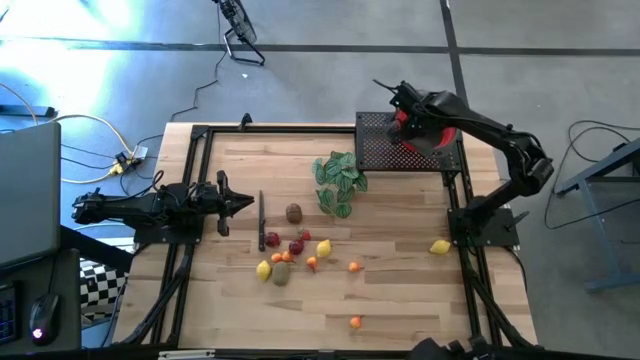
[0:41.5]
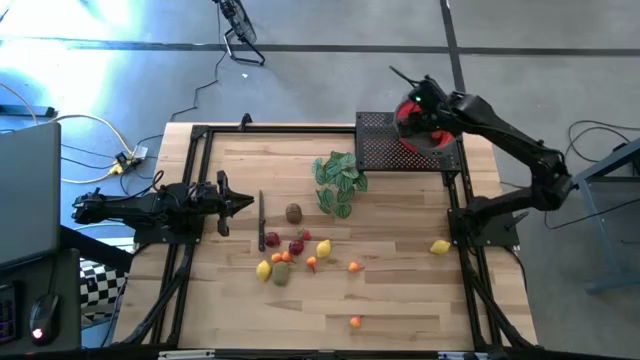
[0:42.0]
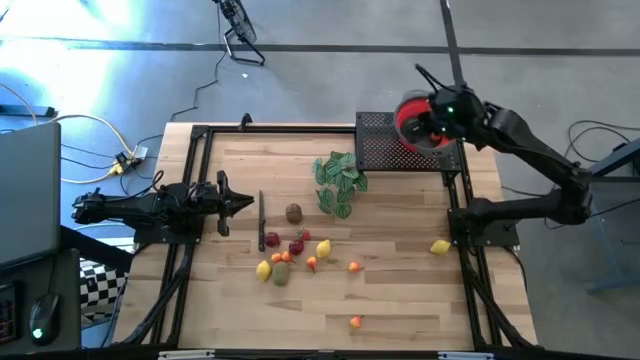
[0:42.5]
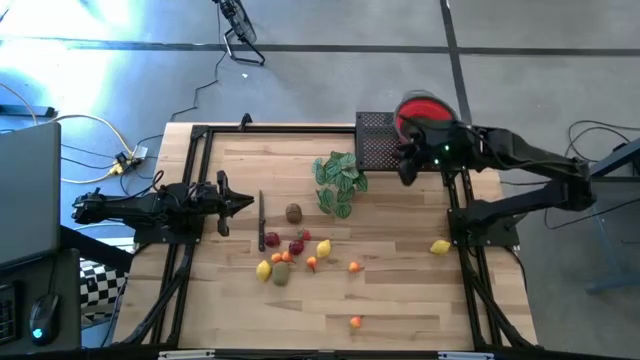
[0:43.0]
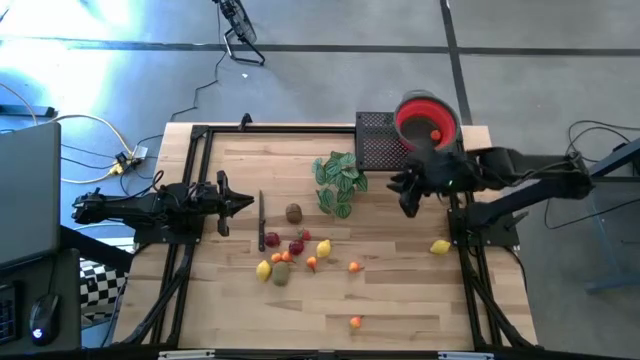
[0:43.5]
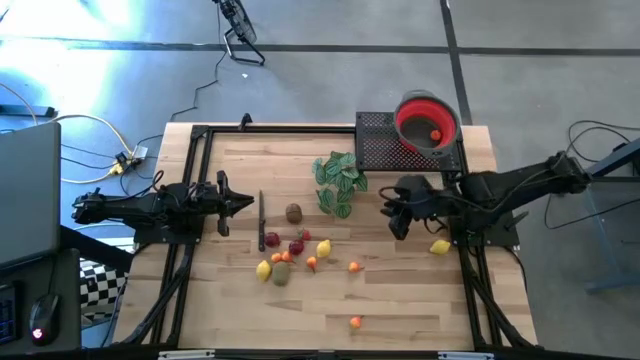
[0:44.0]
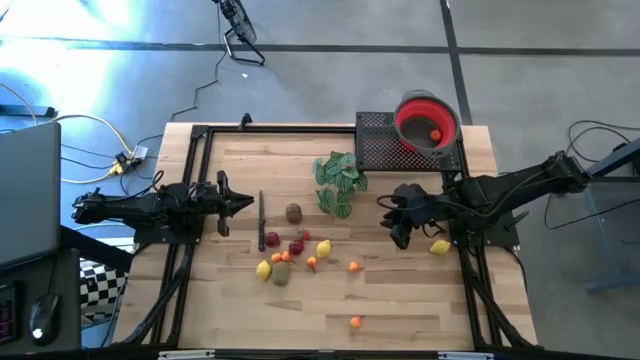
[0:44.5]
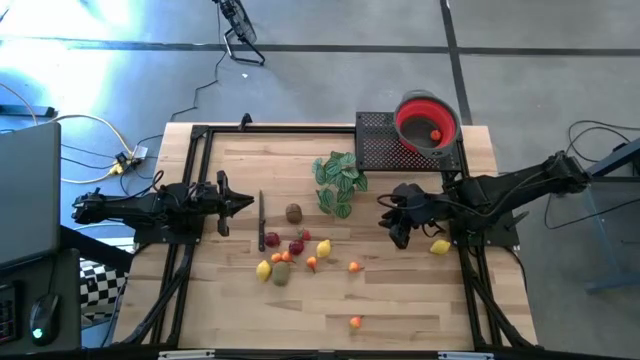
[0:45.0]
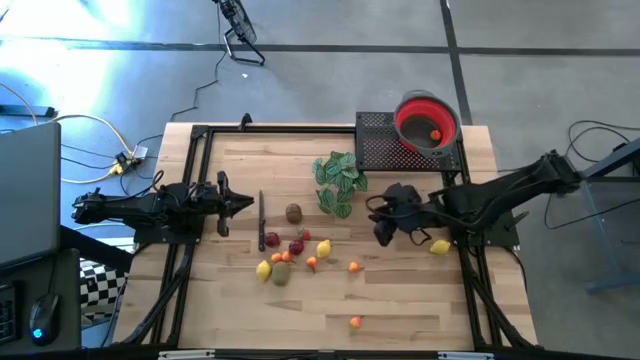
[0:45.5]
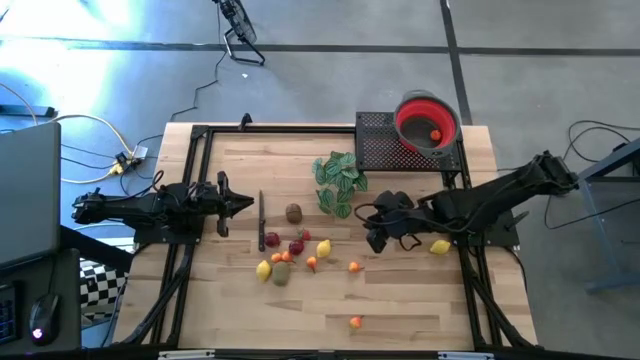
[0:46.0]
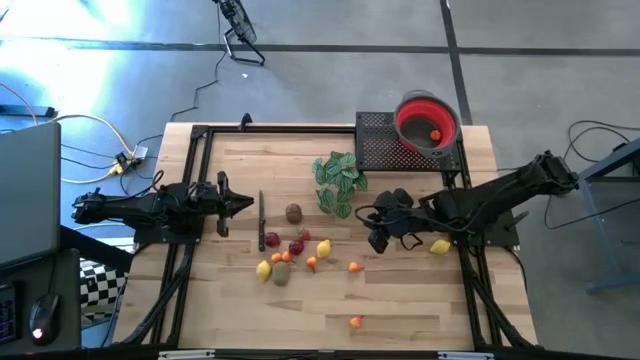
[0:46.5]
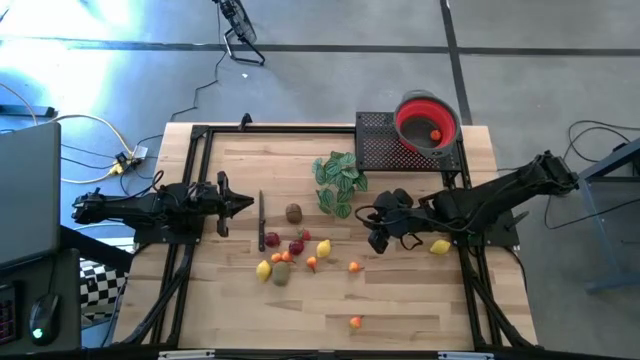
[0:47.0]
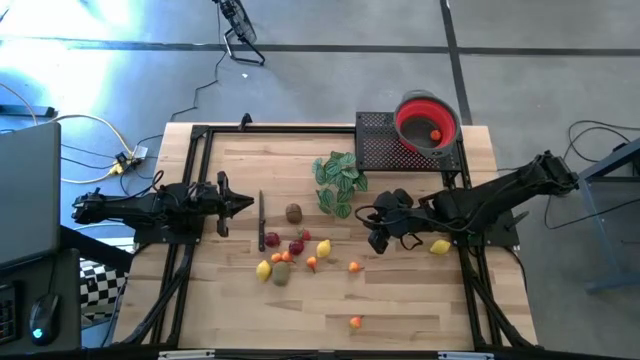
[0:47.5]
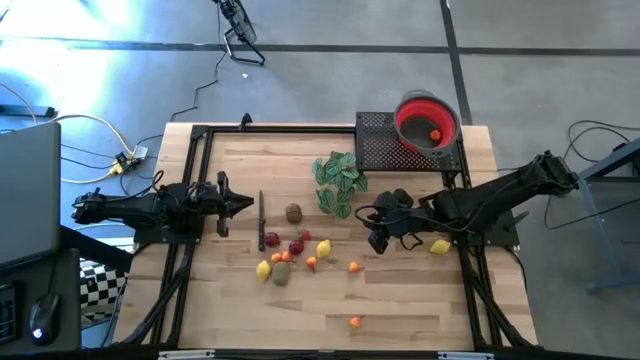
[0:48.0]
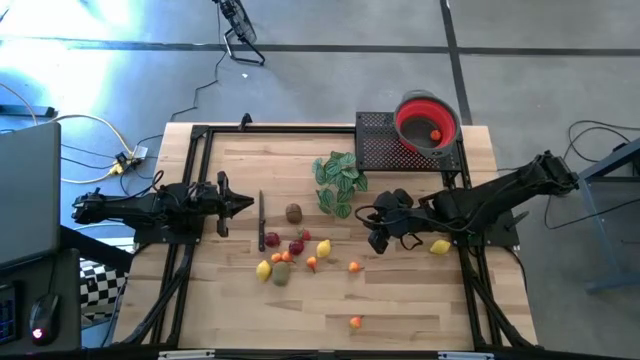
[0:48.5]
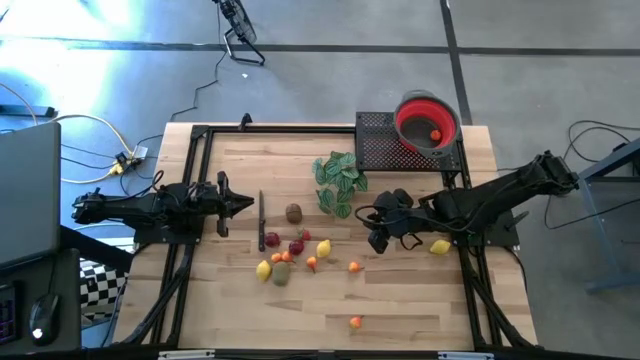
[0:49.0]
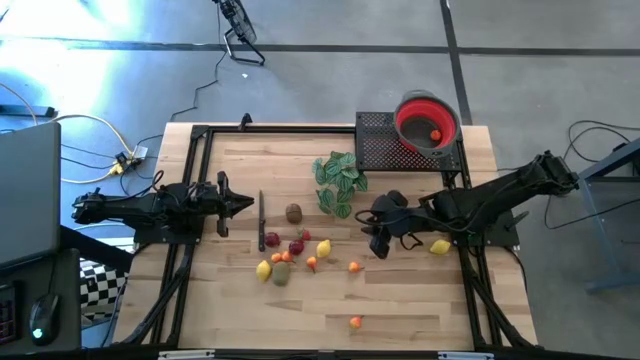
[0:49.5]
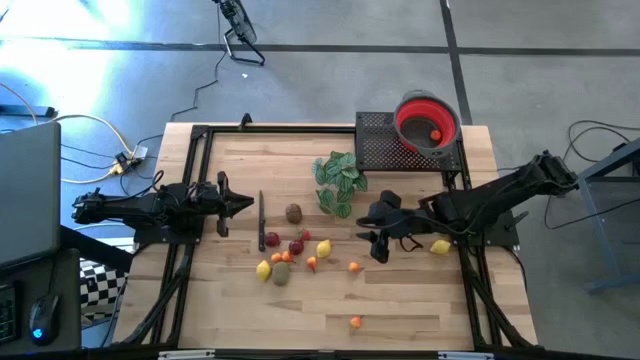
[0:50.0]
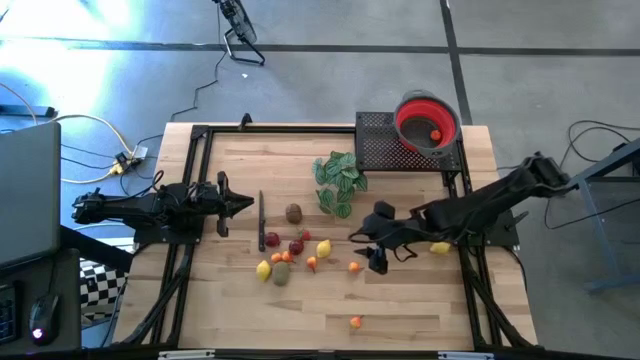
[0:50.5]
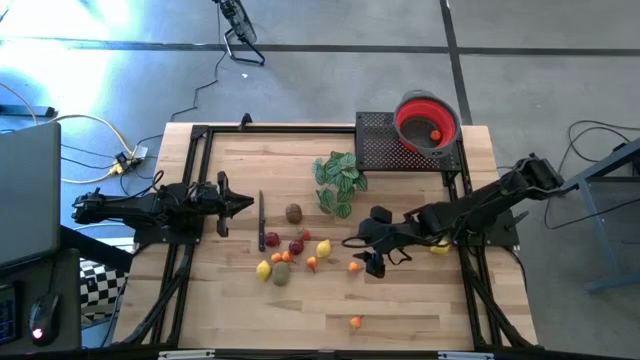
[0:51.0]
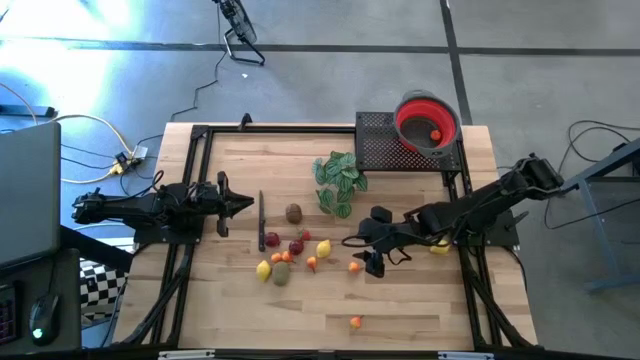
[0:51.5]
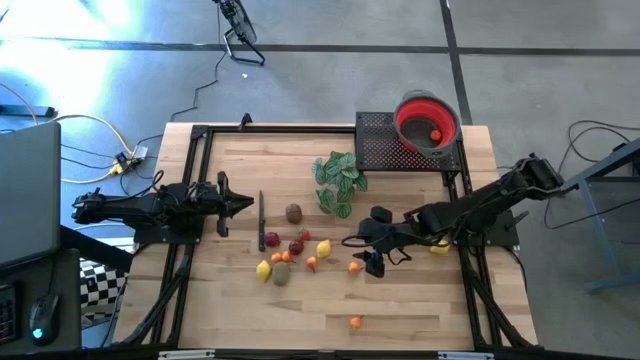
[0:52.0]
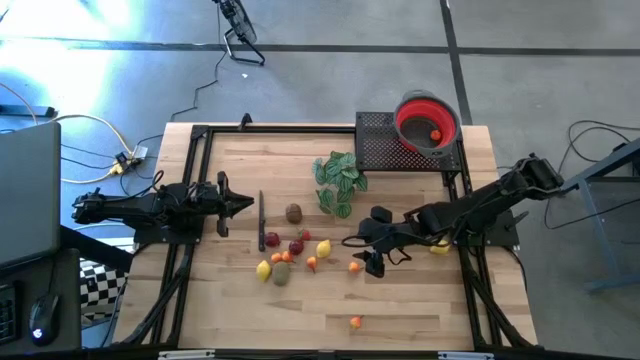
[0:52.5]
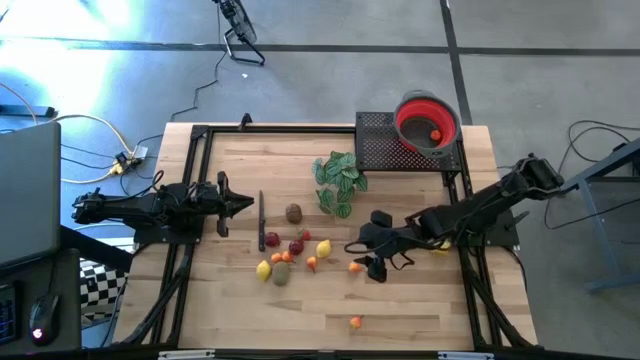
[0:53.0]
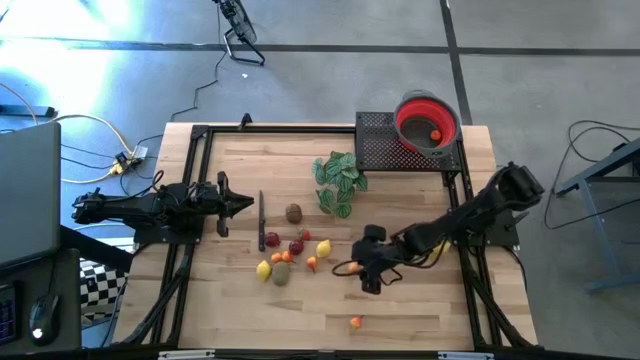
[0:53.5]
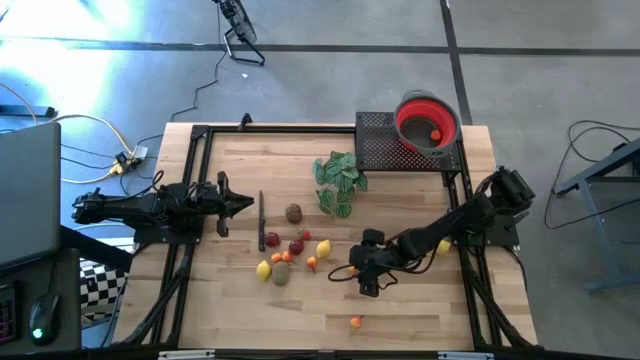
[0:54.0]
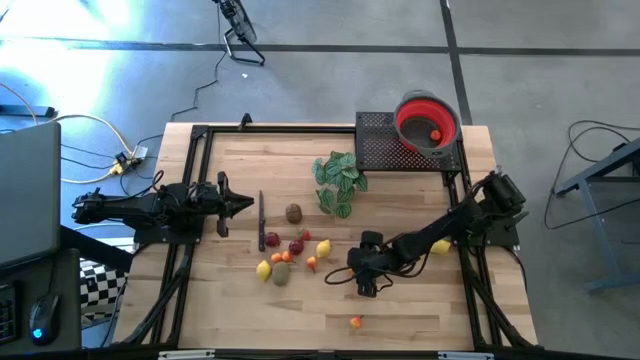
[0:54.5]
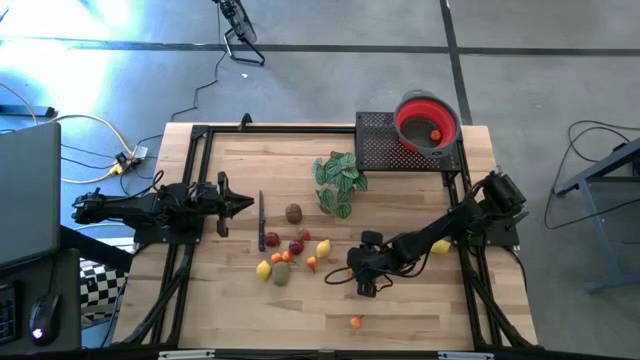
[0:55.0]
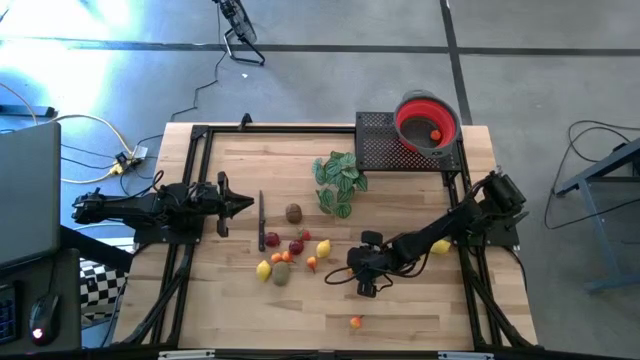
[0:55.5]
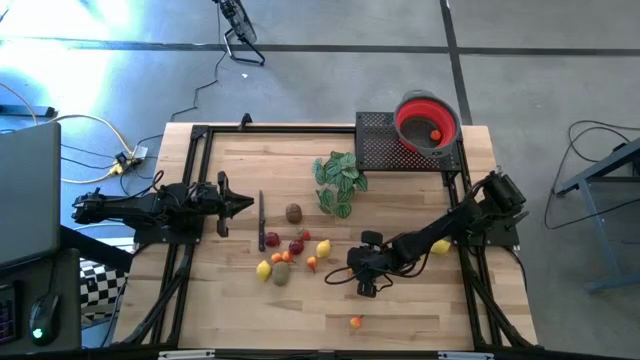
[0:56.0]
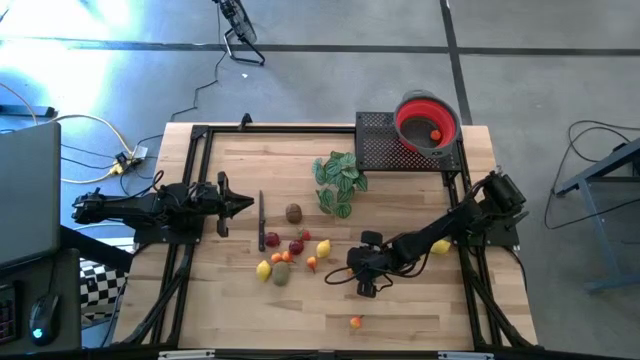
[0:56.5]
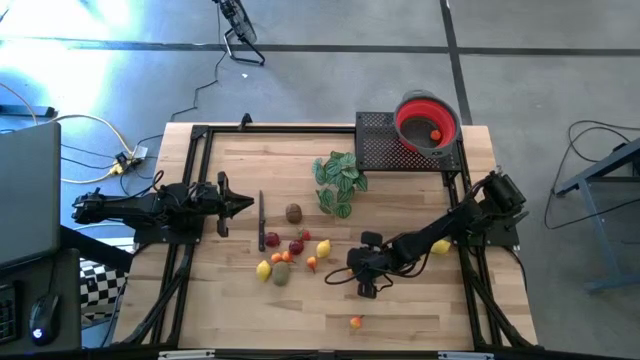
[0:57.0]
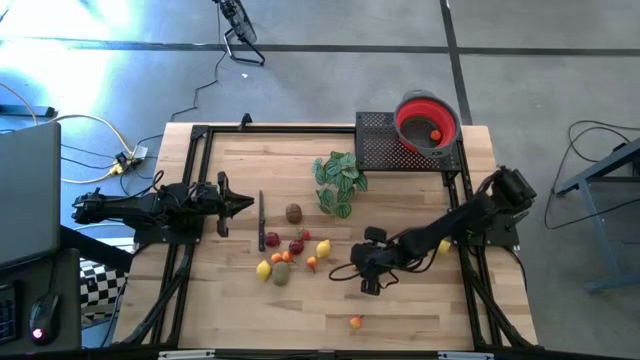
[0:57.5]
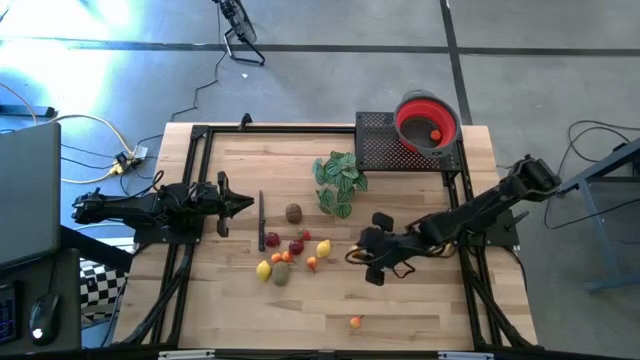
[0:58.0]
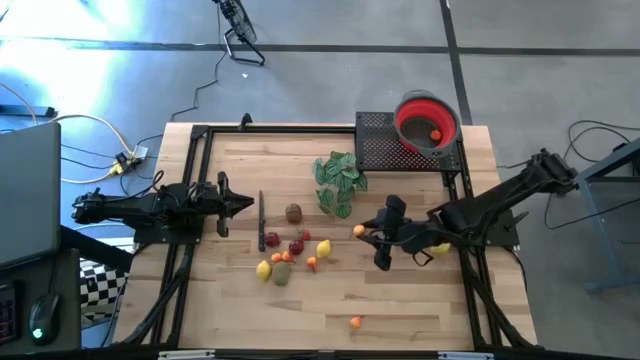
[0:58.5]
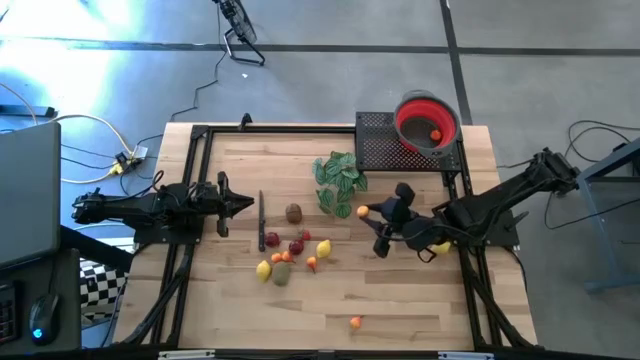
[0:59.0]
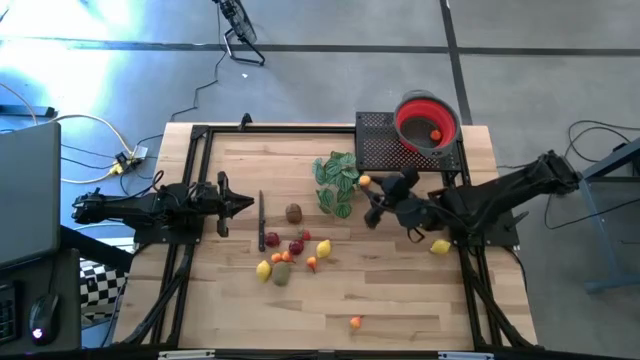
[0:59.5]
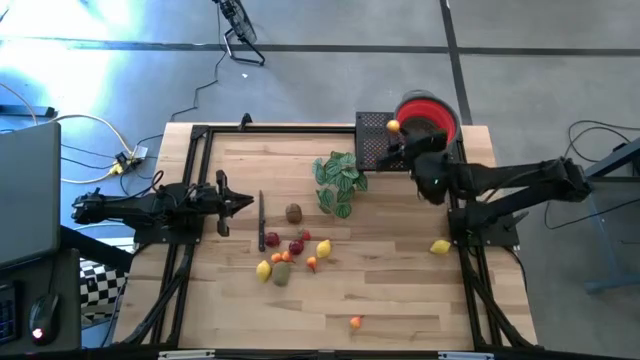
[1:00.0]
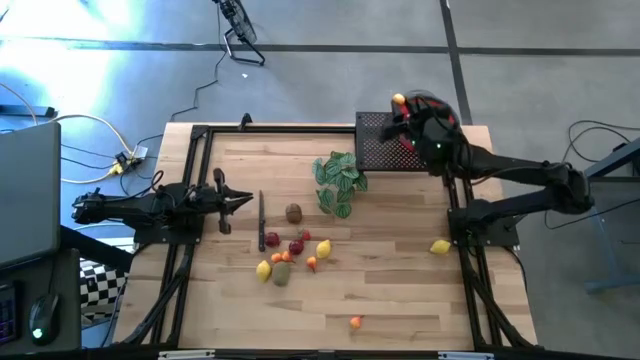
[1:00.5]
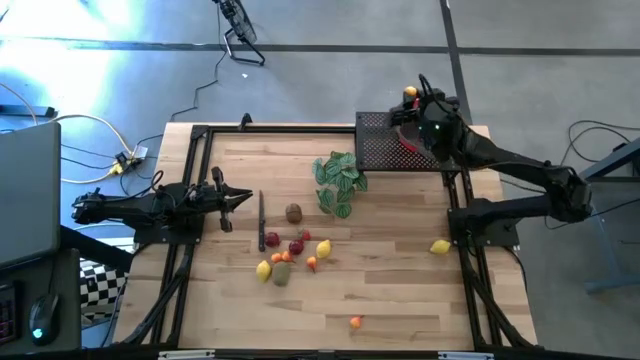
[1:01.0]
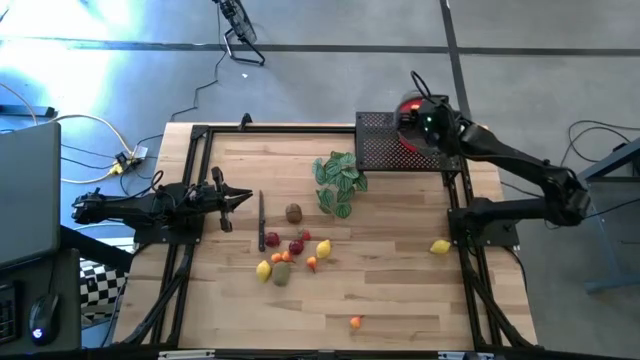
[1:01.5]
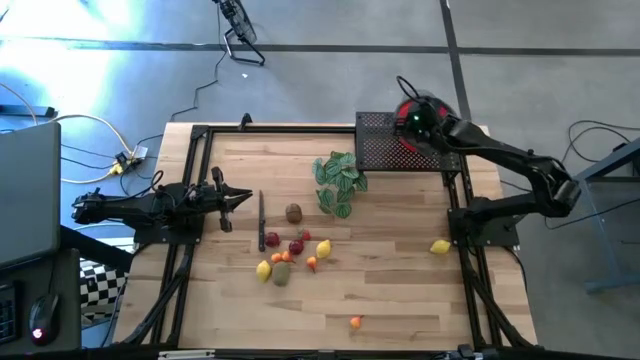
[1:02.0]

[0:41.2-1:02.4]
Task: Pick & Place Fruit
Put the orange pear into the red colander

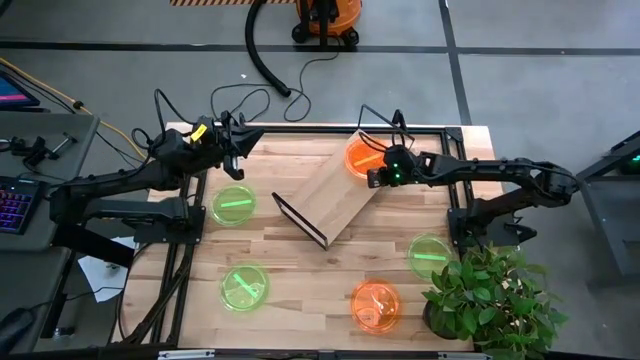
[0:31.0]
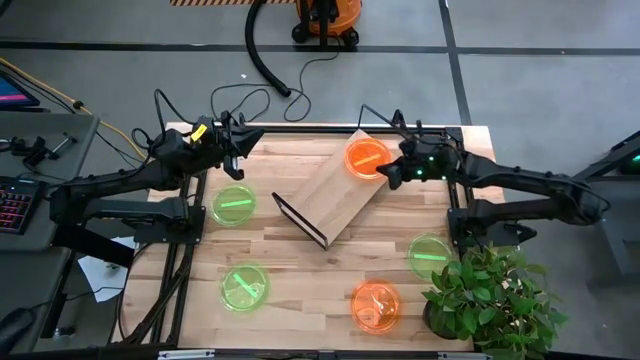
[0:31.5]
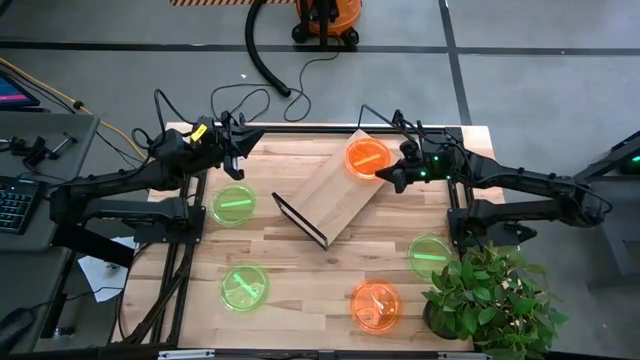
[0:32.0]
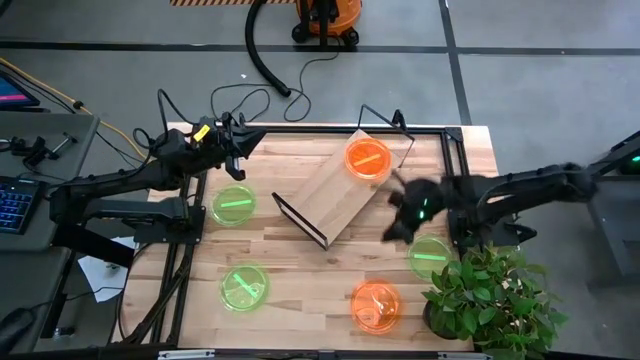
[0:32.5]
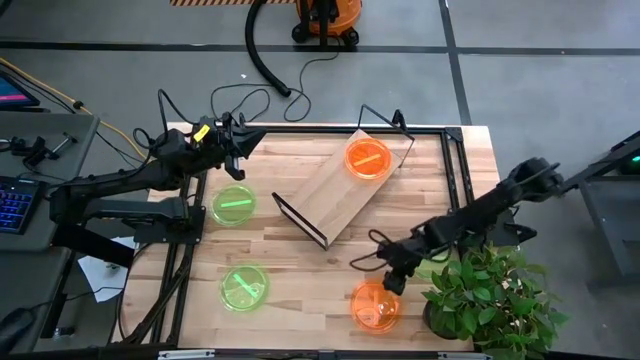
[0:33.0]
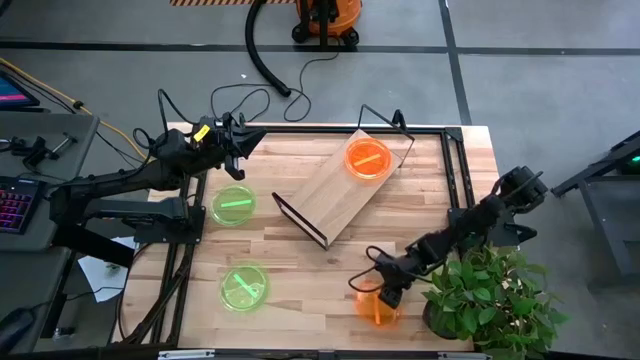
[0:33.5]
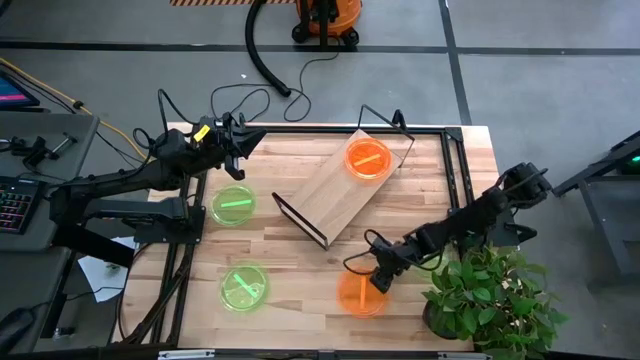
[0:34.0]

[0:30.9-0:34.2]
Task: Place and stack plates onto a shelf
Stack the orange plate on top of the orange plate on the shelf
